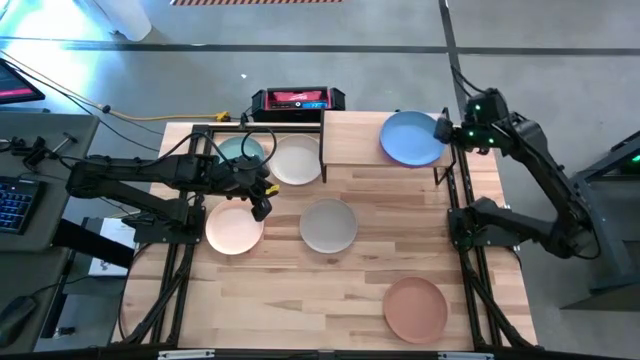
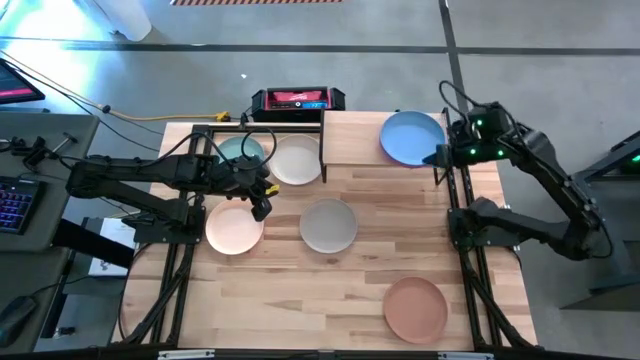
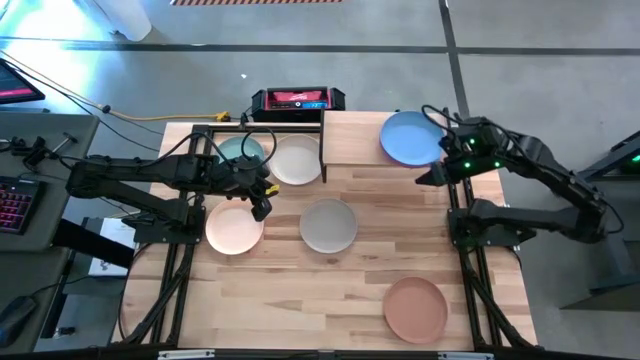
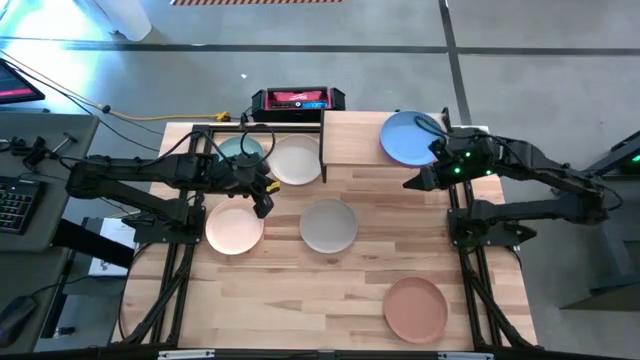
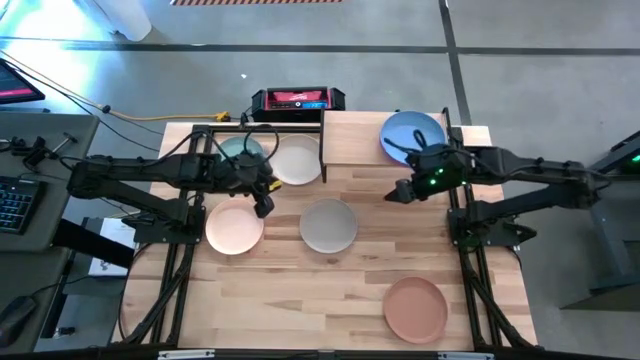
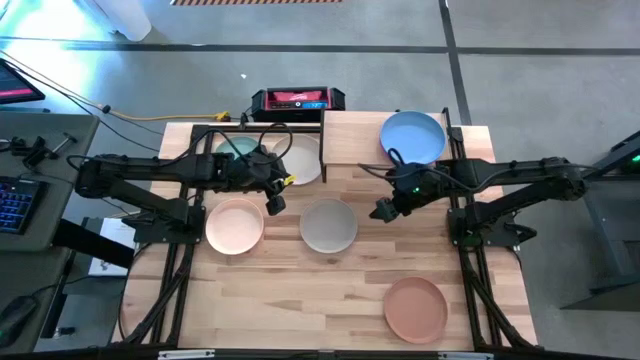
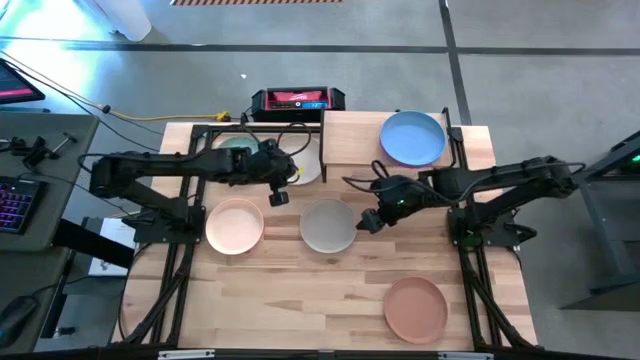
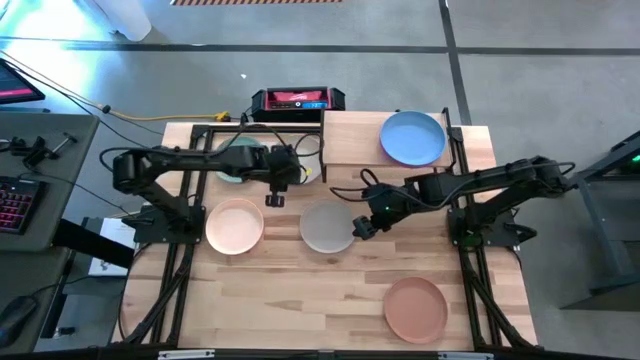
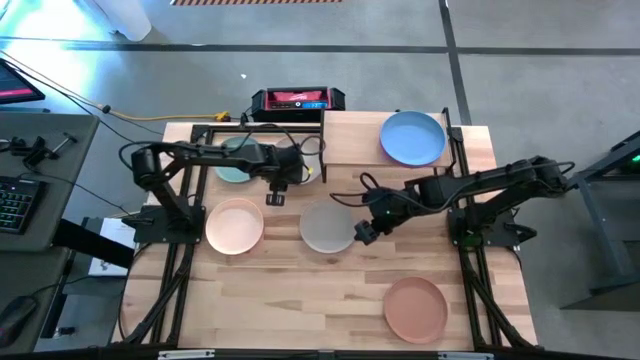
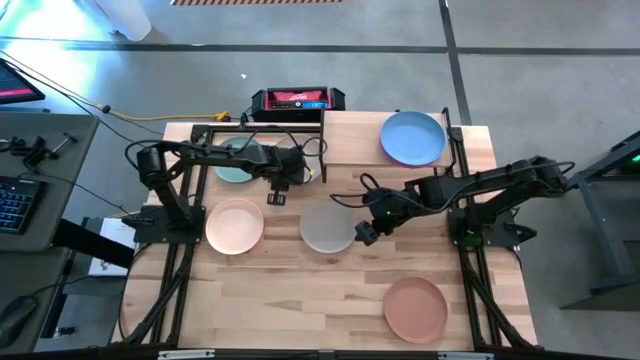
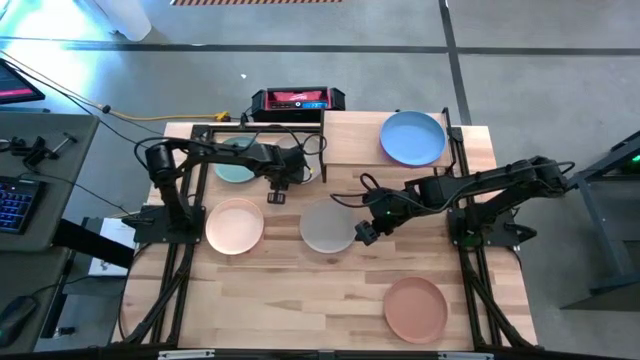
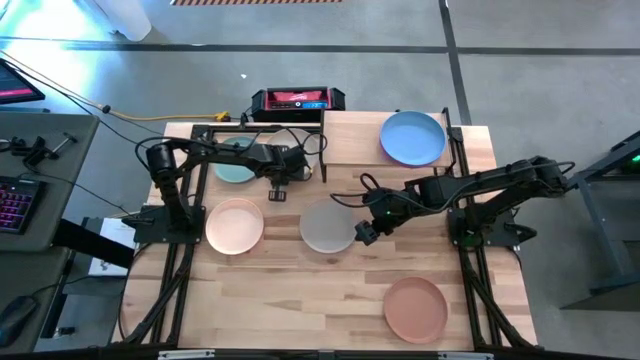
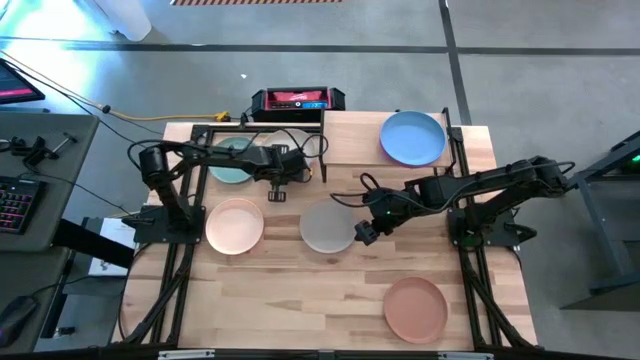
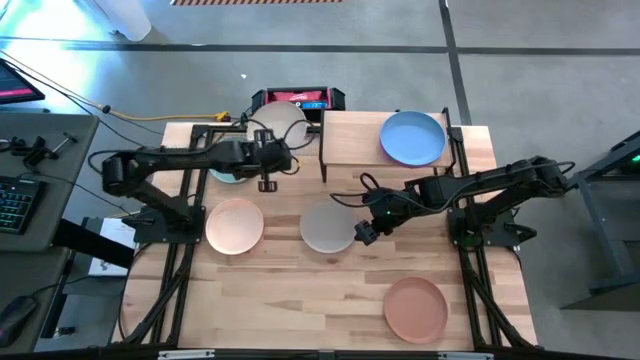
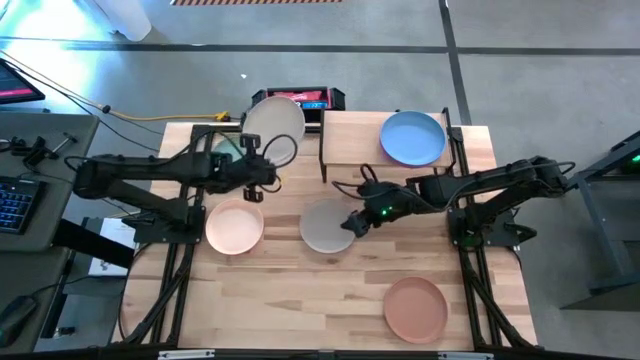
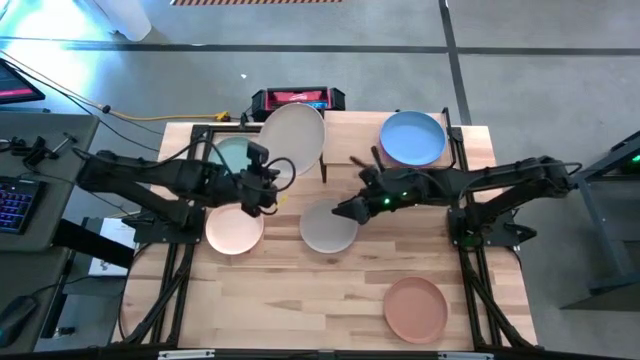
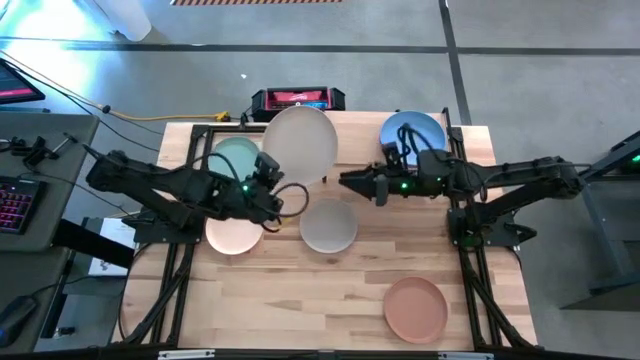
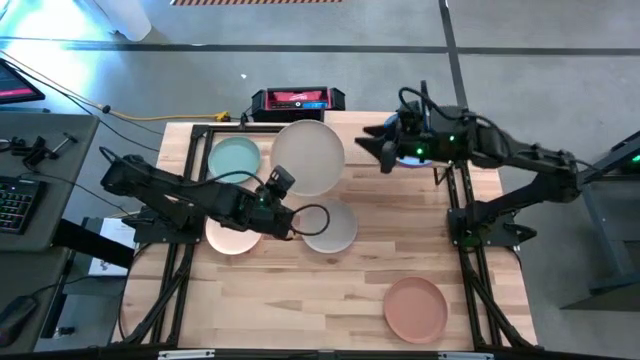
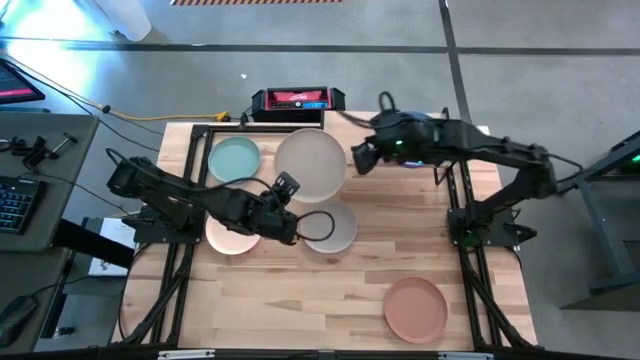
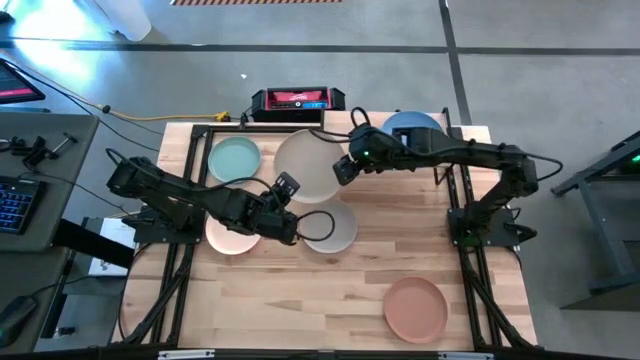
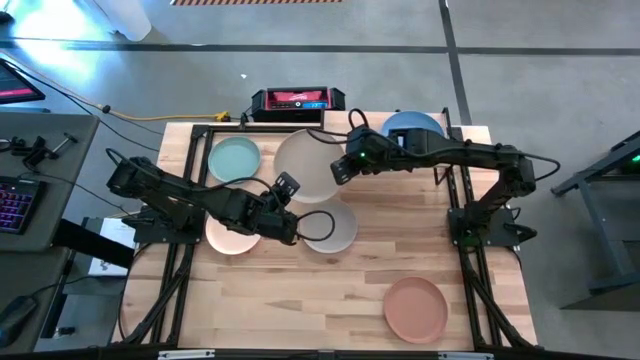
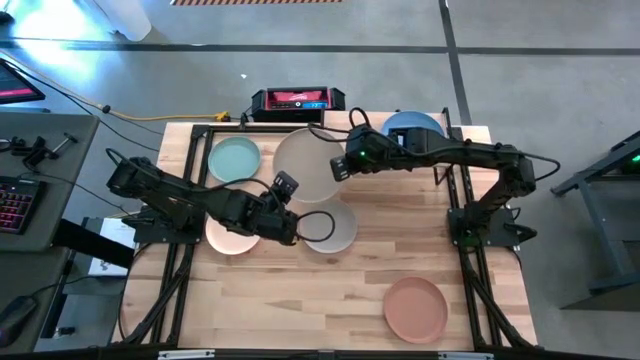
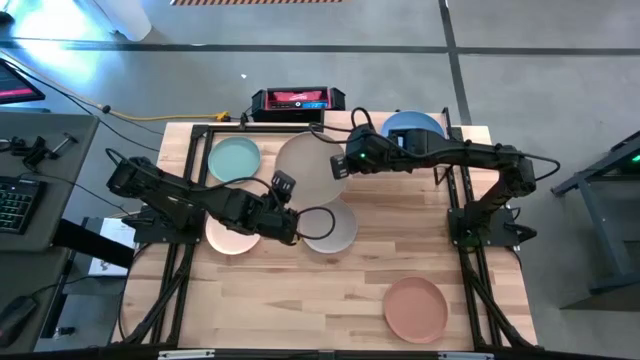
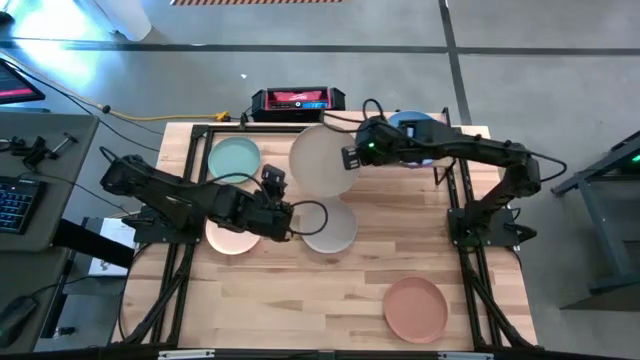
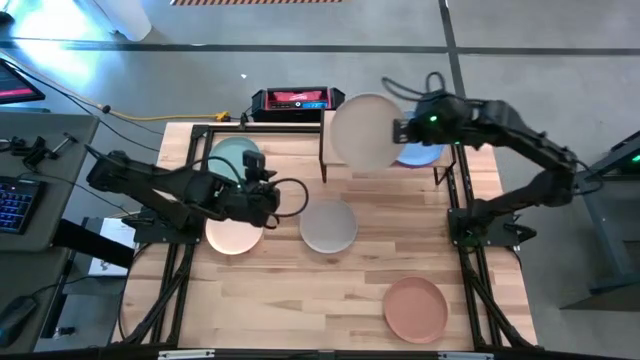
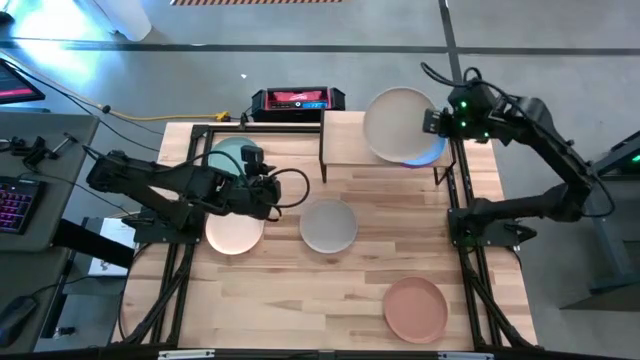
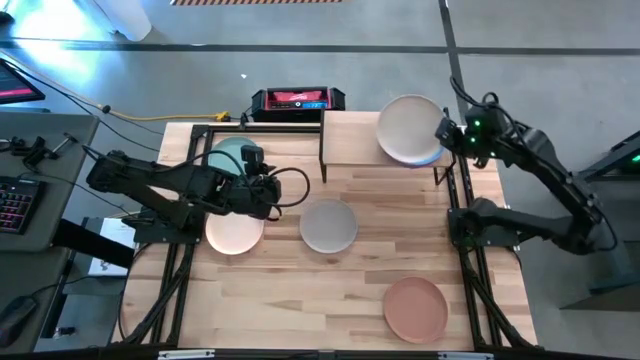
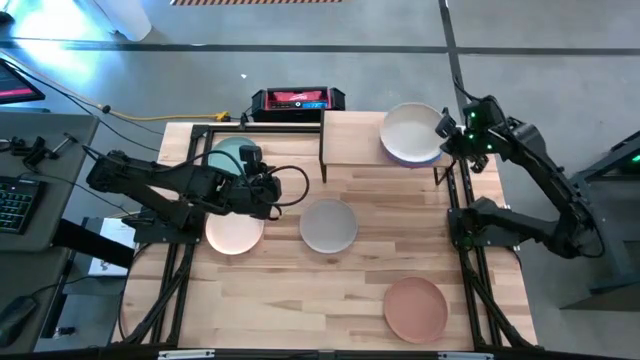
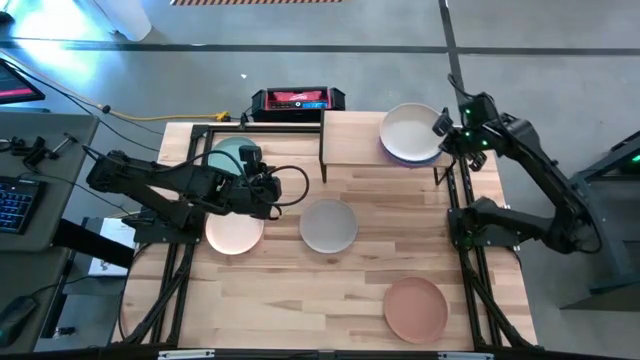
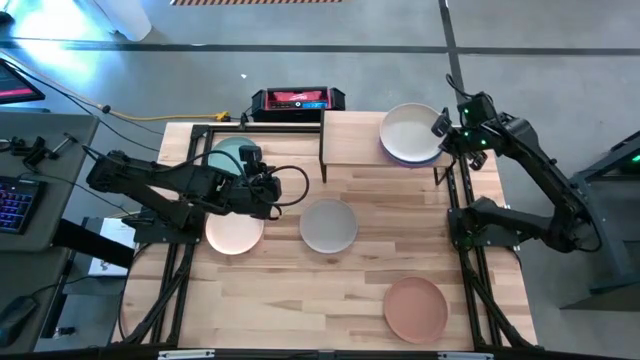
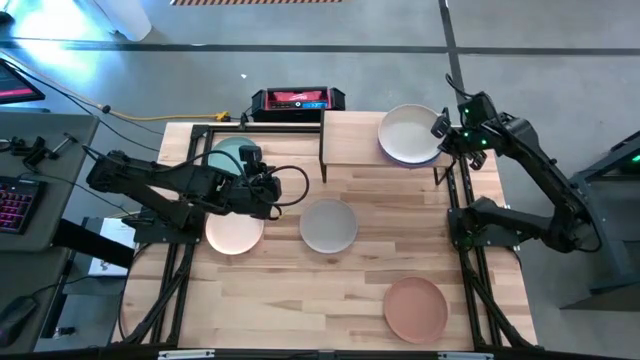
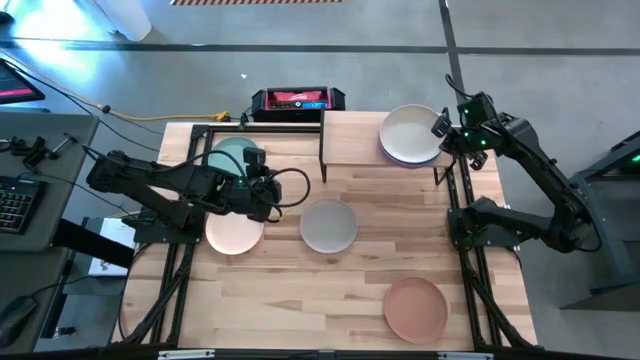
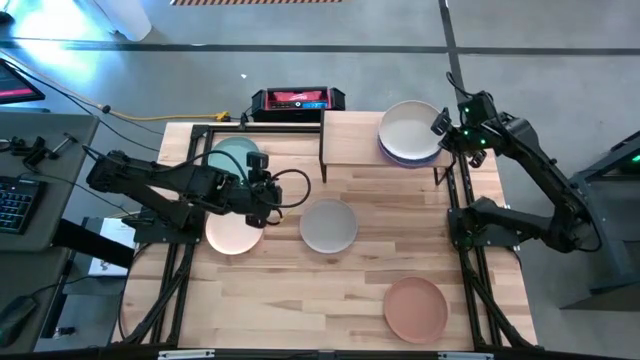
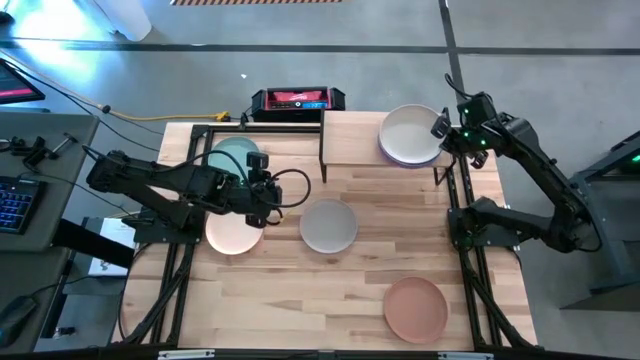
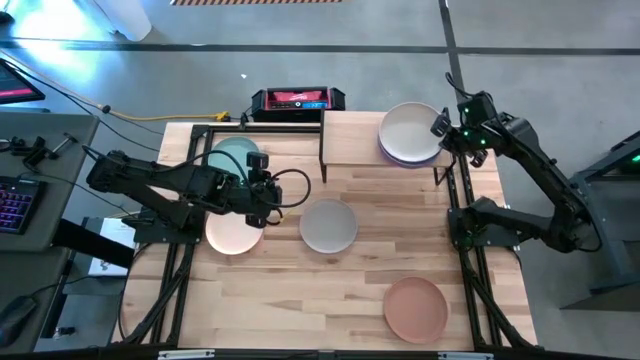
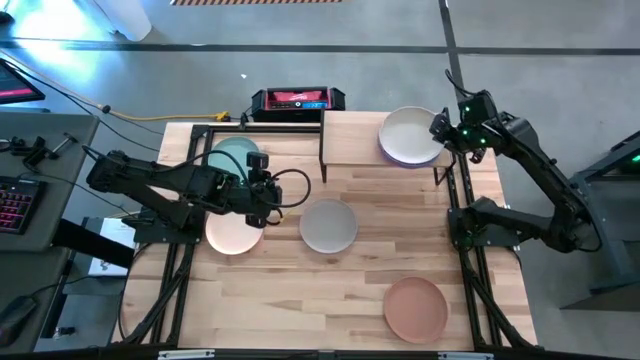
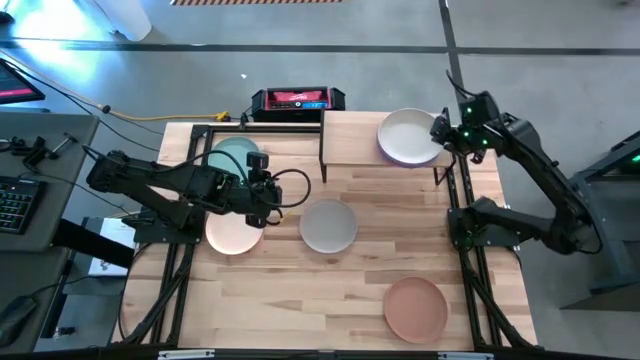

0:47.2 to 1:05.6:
Task: Place and stack plates onto a shelf
Stack the light gray plate on top of the blue plate on the shelf

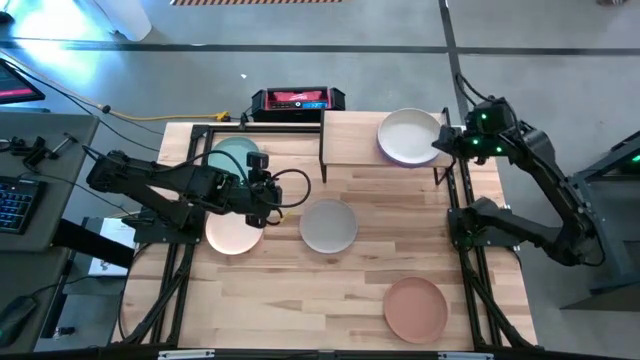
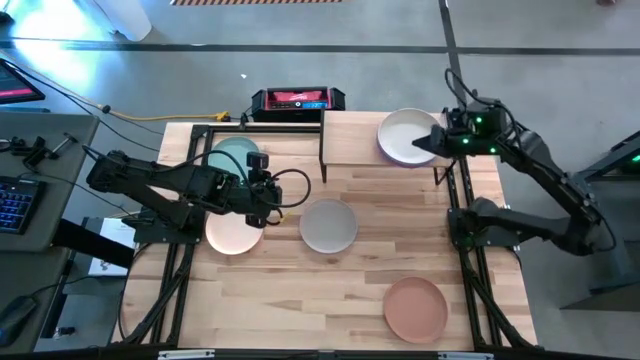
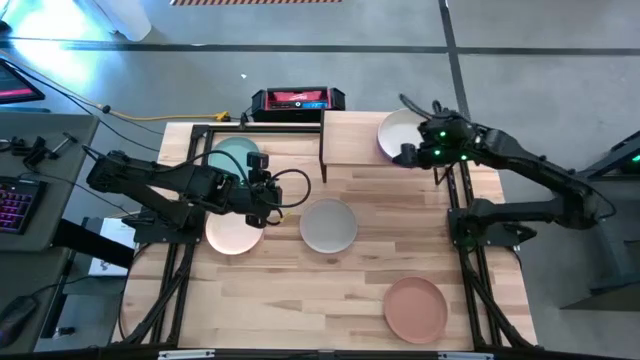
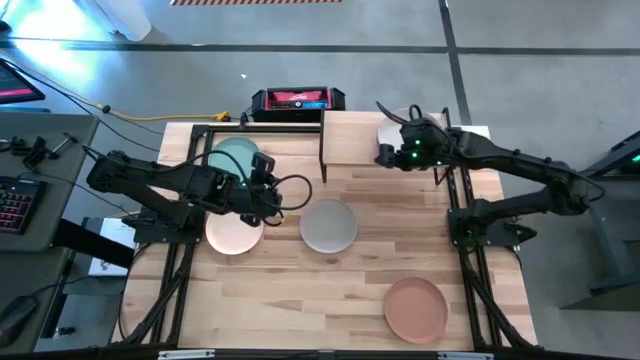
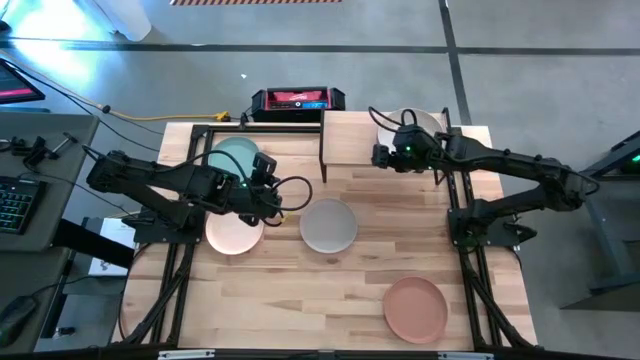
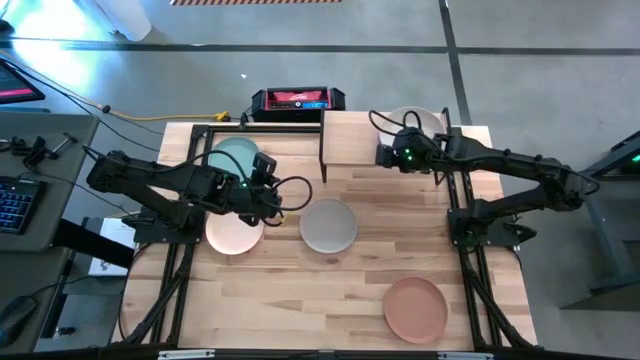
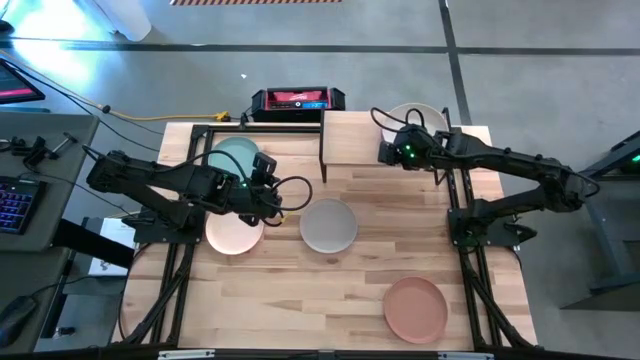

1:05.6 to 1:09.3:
Adjust the plates on the shelf
